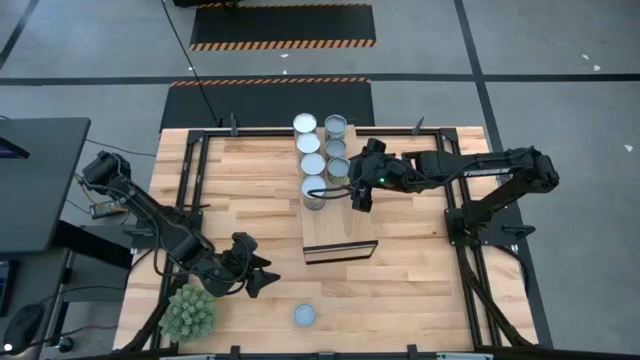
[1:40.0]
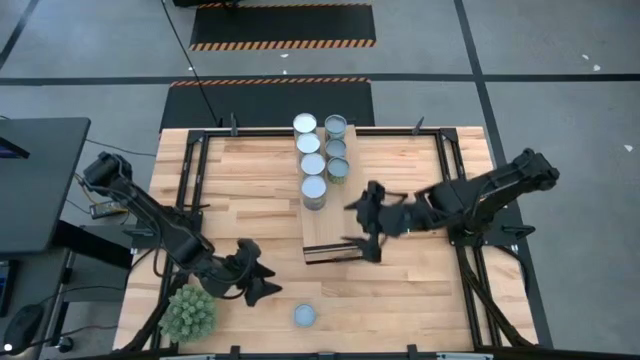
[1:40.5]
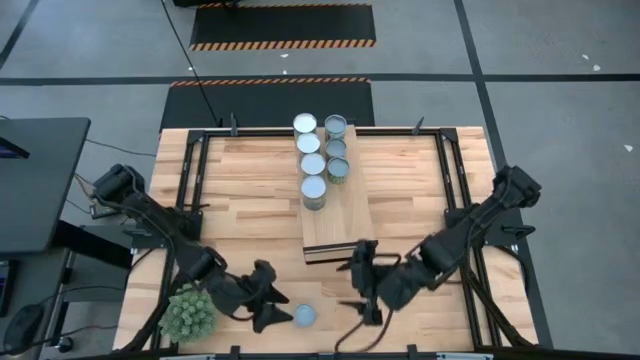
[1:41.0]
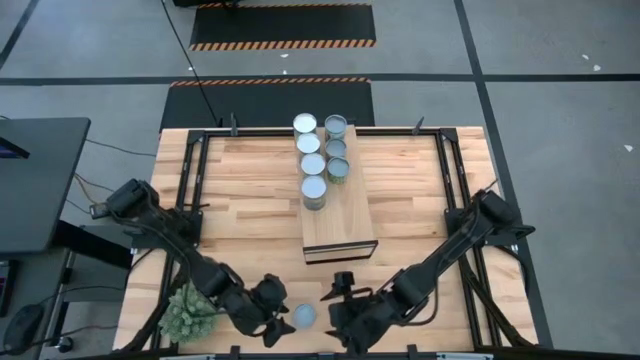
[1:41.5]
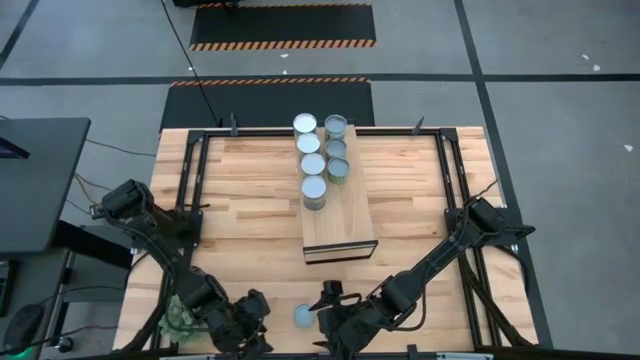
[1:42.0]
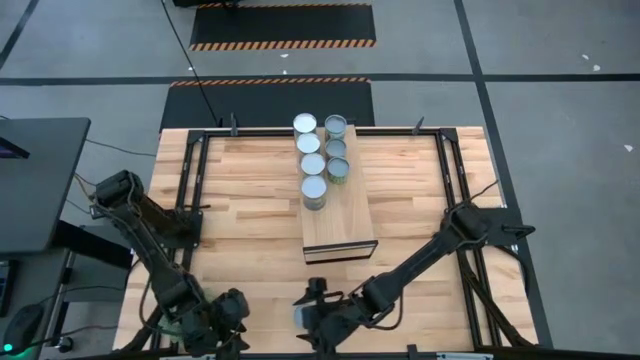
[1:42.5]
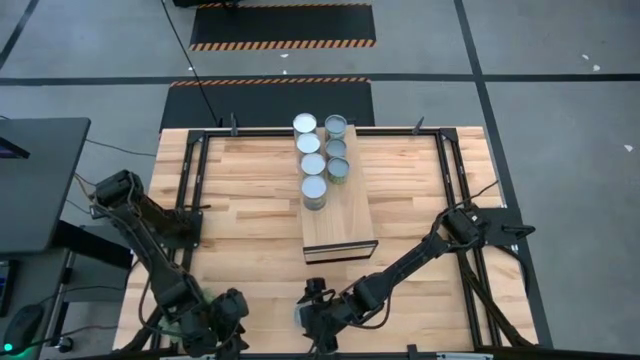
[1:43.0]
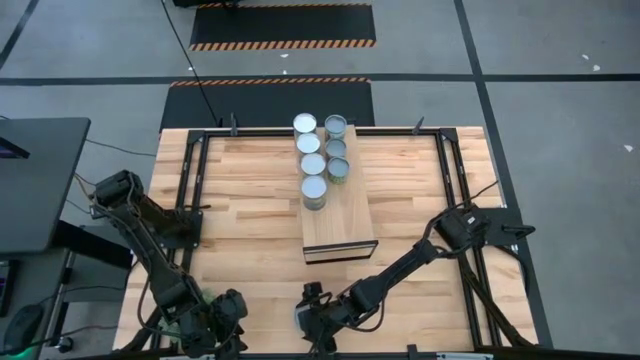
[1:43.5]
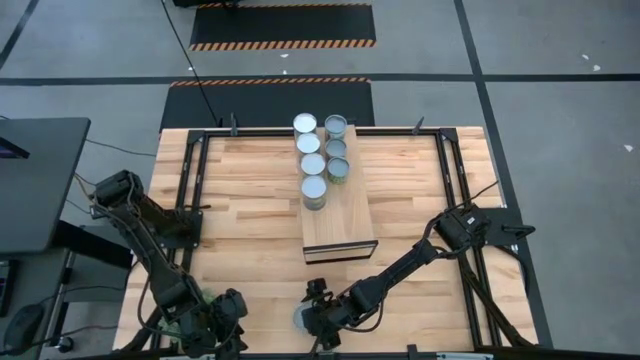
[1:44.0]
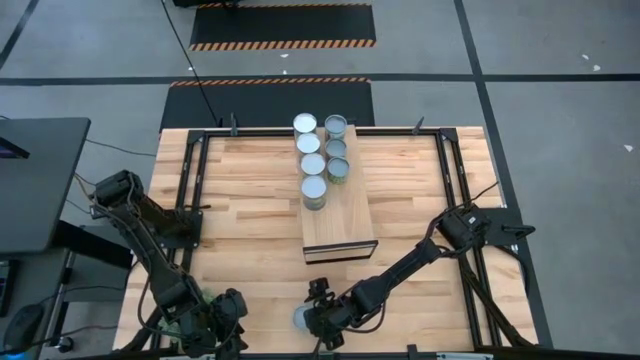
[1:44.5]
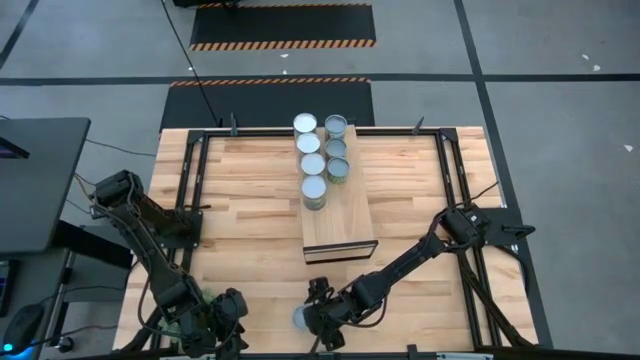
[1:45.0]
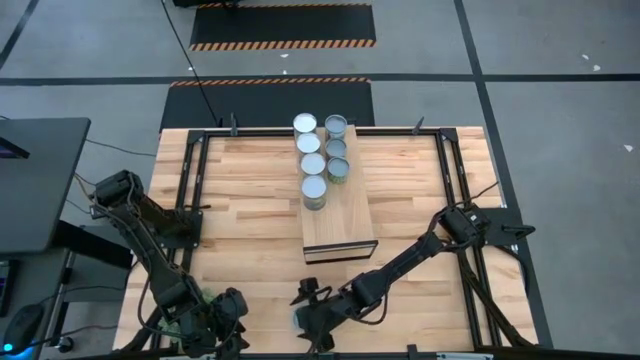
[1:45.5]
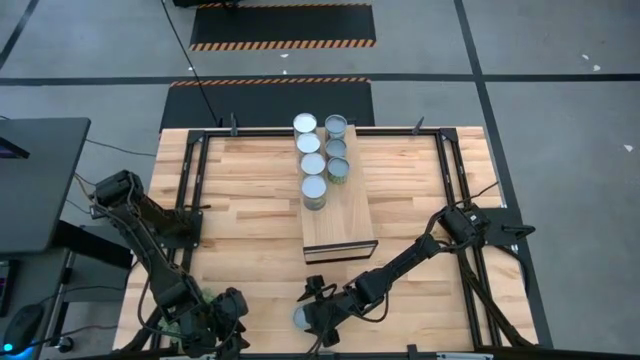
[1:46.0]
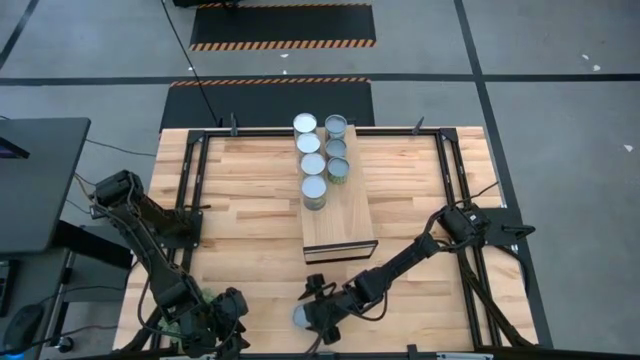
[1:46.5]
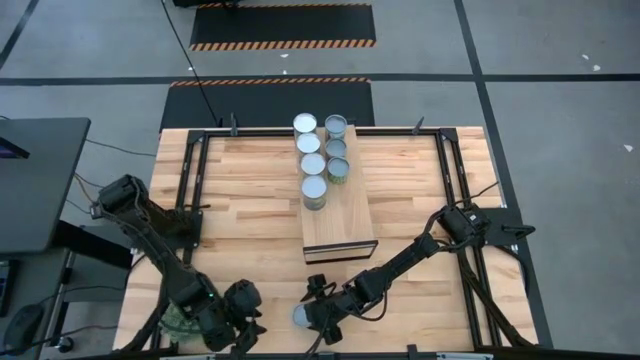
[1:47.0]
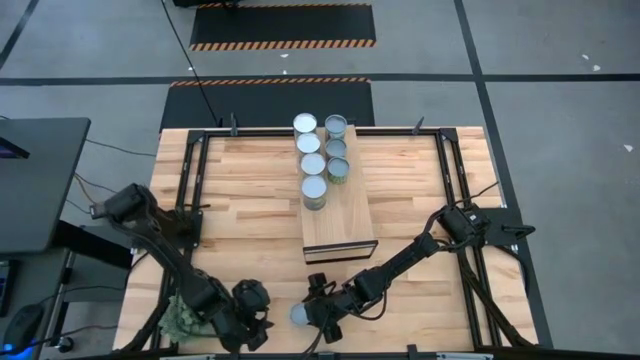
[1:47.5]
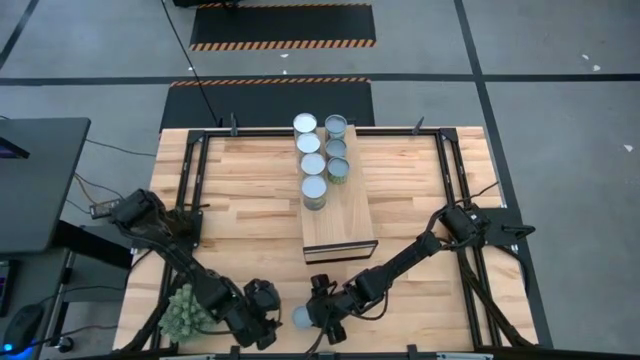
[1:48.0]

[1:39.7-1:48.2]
Task: Pick and place cans onto a shelf
Put the canned tuna on the shelf

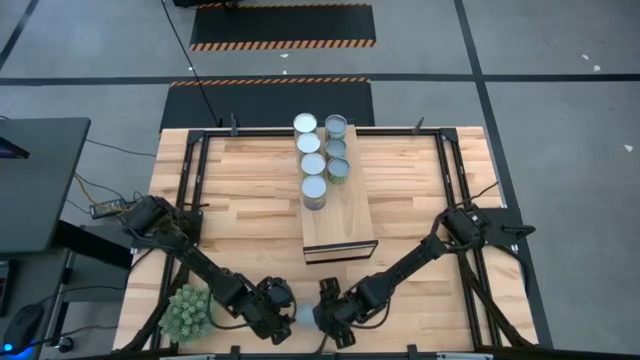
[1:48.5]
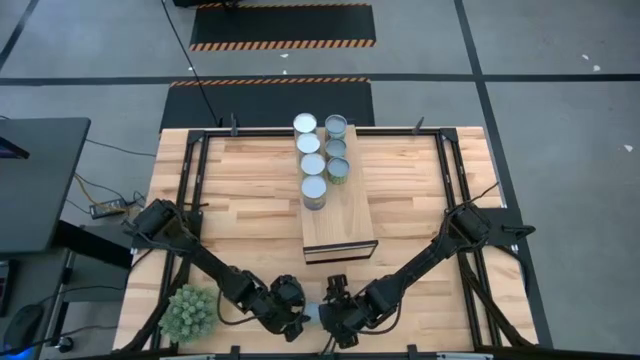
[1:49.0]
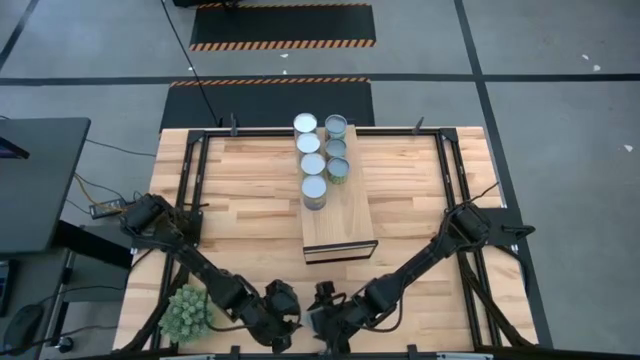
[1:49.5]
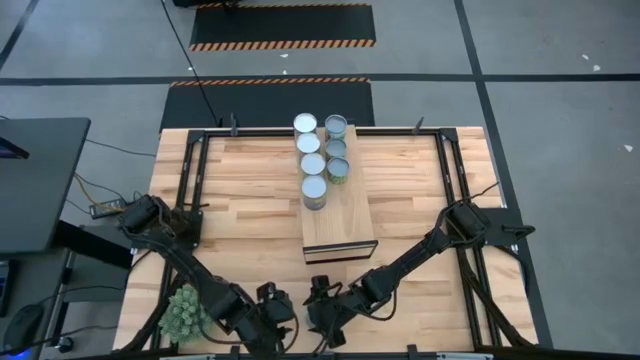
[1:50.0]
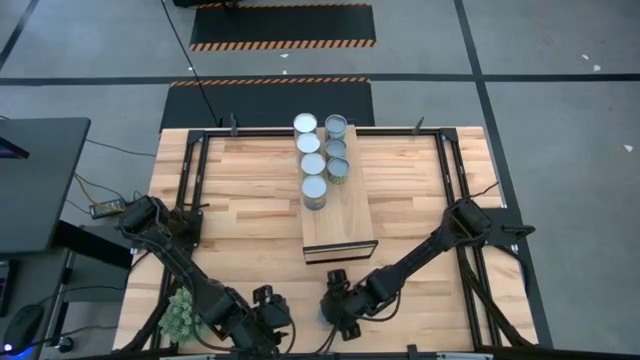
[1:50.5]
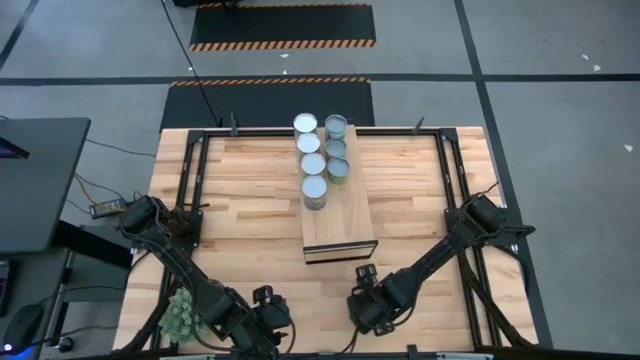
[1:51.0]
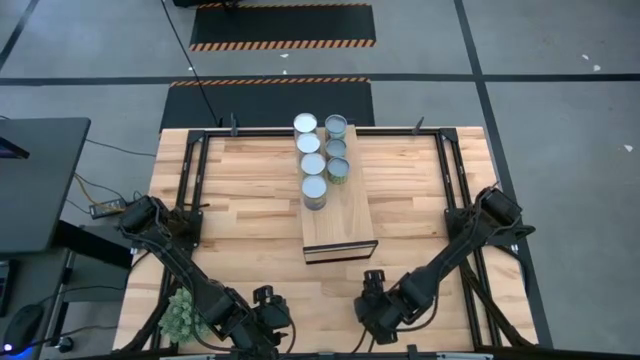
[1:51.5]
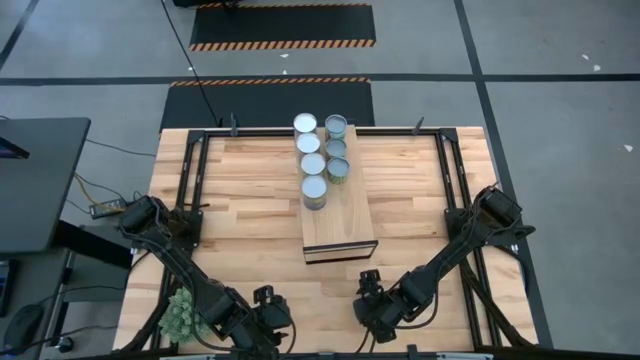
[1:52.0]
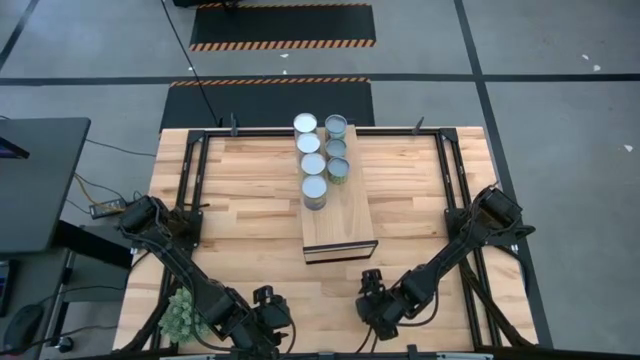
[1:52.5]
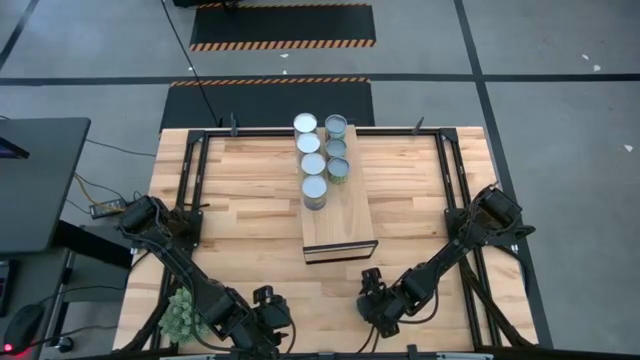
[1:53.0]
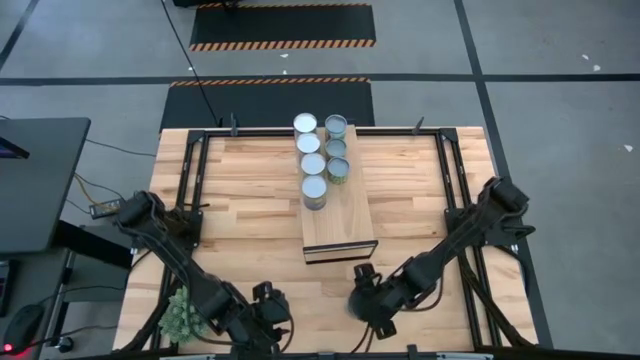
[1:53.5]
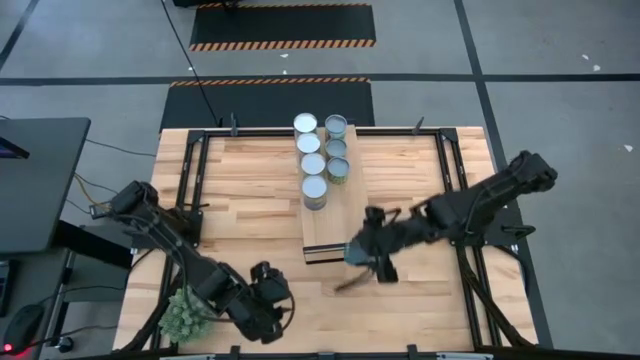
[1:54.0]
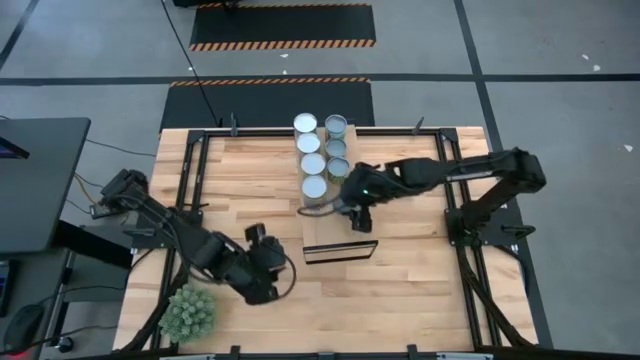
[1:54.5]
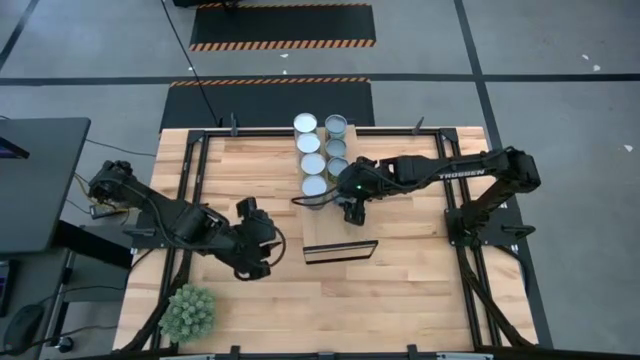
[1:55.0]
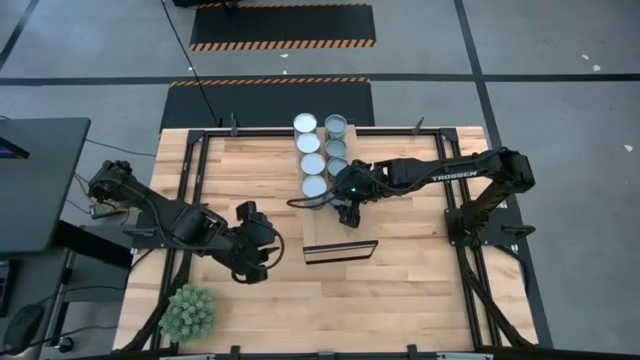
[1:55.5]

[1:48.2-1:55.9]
Put the canned tuna on the shelf

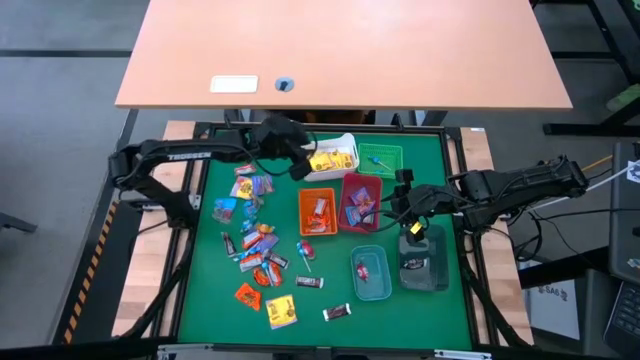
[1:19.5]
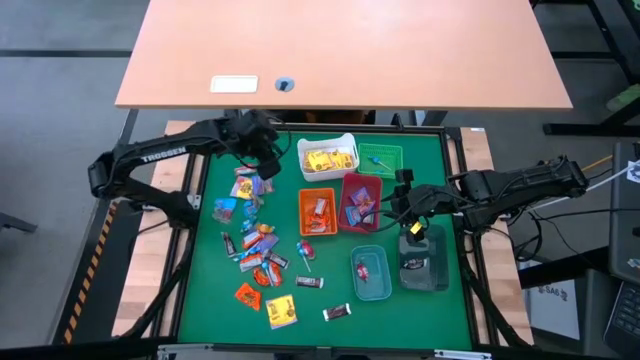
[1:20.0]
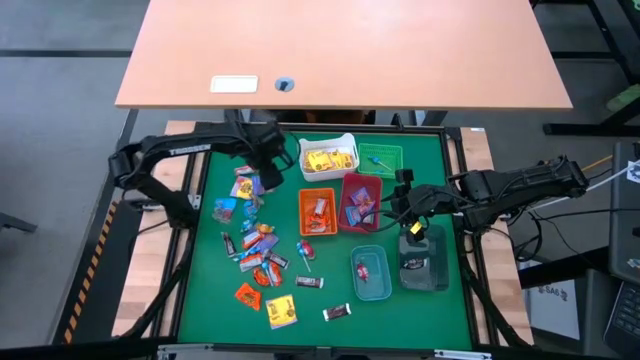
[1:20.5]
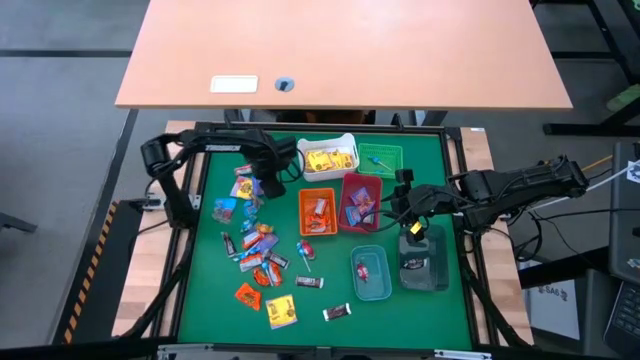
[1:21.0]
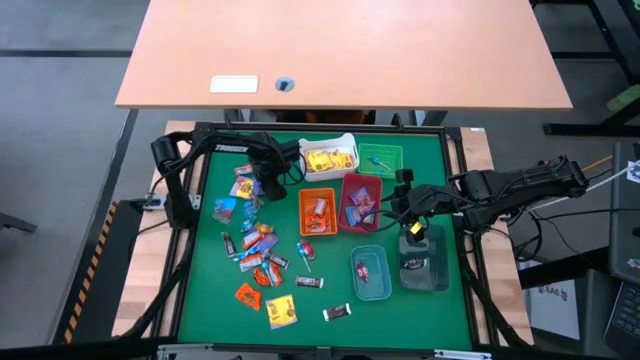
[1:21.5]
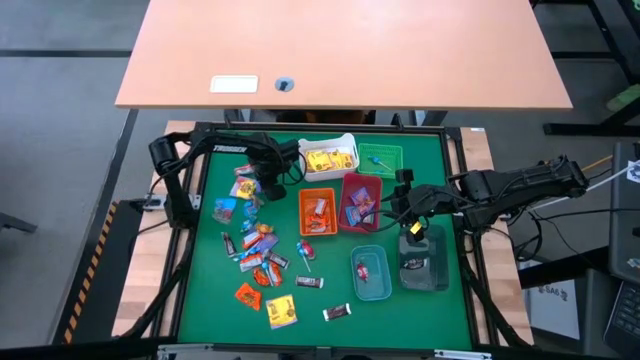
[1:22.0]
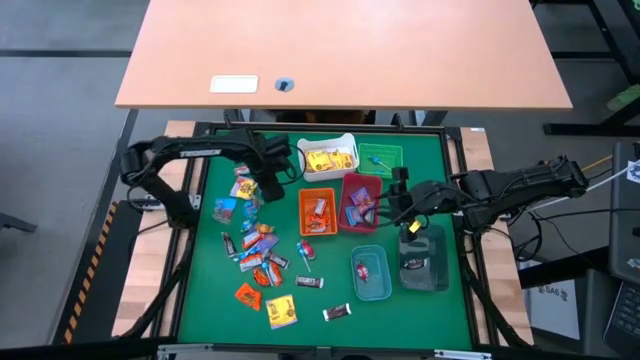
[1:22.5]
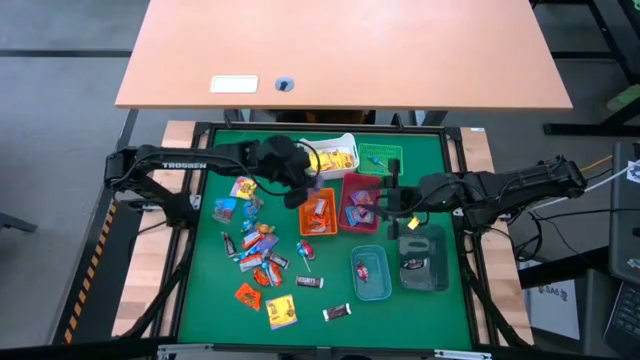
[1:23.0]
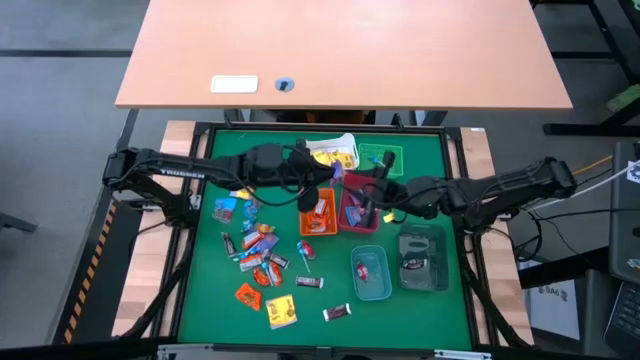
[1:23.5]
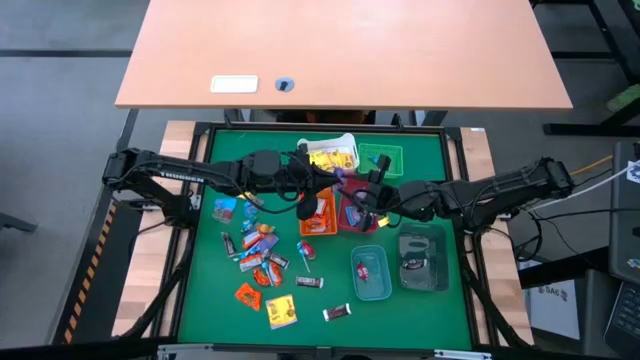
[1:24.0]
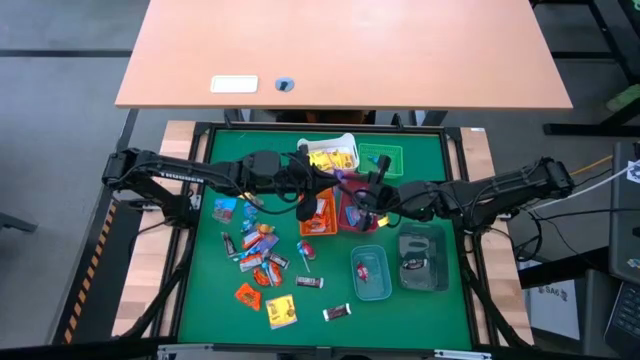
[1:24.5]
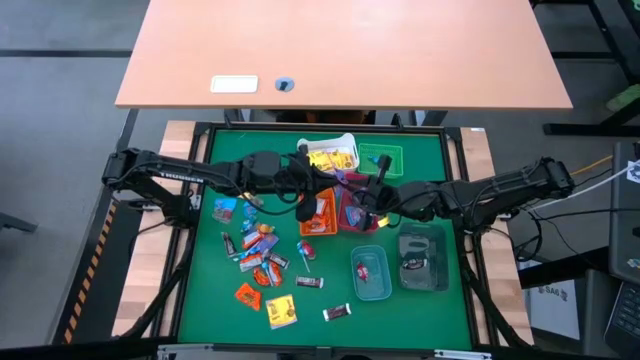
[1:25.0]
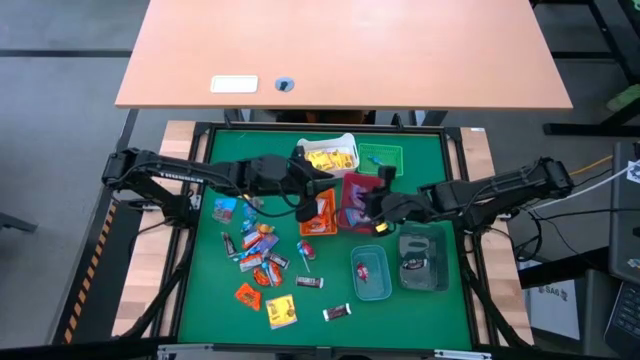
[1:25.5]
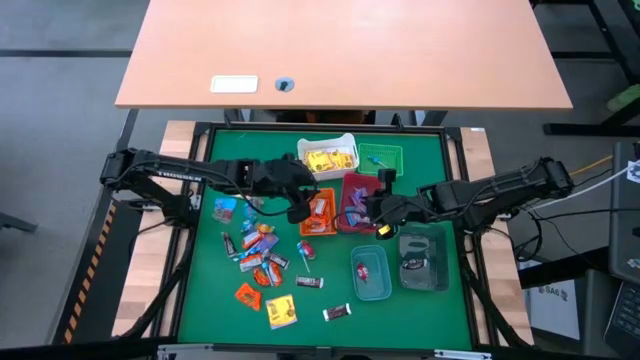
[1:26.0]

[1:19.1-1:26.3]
Task: Sort candy
Put the purple bag of candy into the red bin
